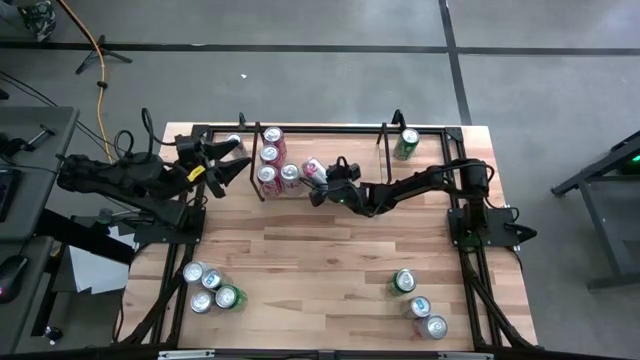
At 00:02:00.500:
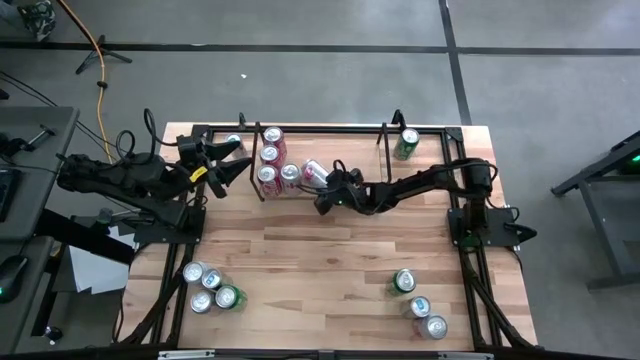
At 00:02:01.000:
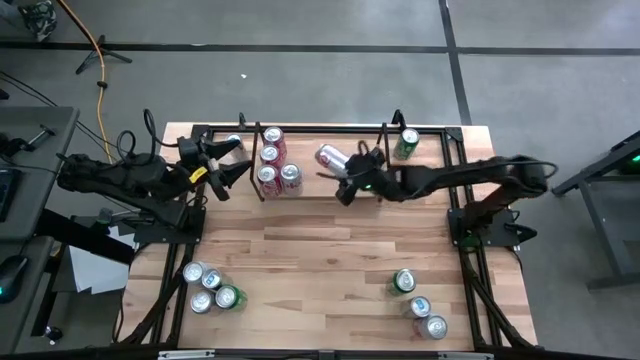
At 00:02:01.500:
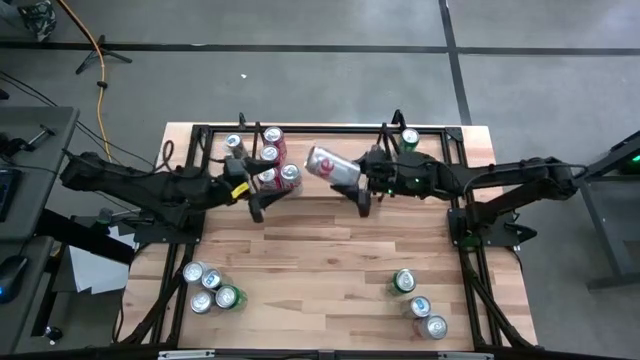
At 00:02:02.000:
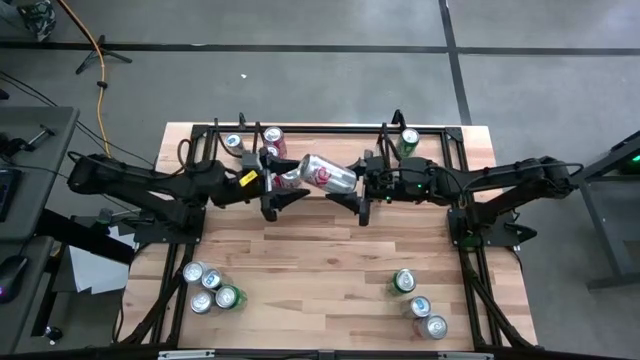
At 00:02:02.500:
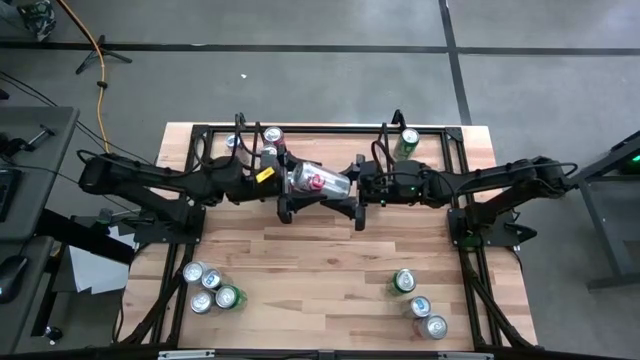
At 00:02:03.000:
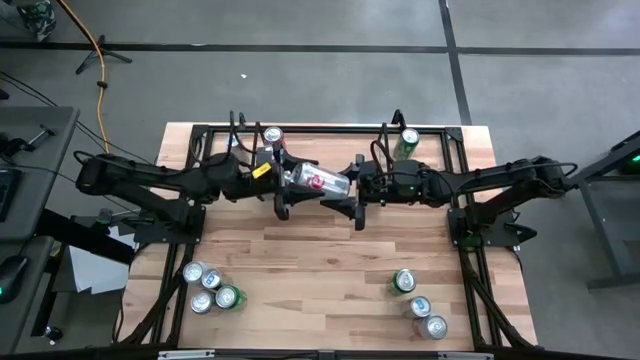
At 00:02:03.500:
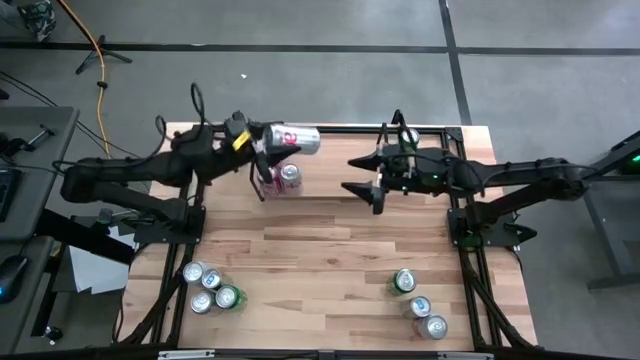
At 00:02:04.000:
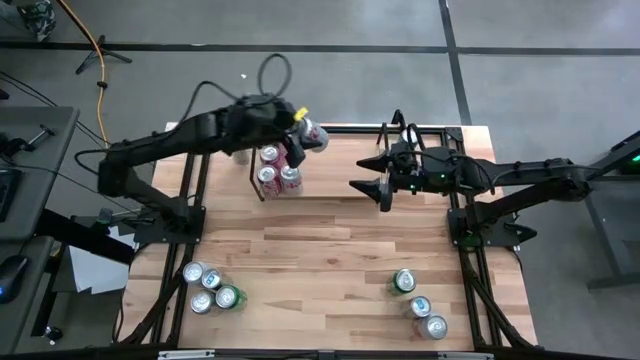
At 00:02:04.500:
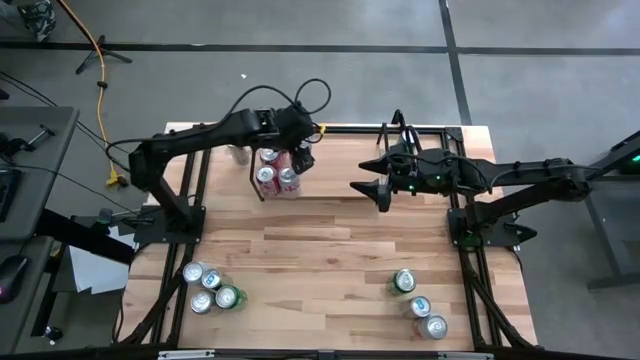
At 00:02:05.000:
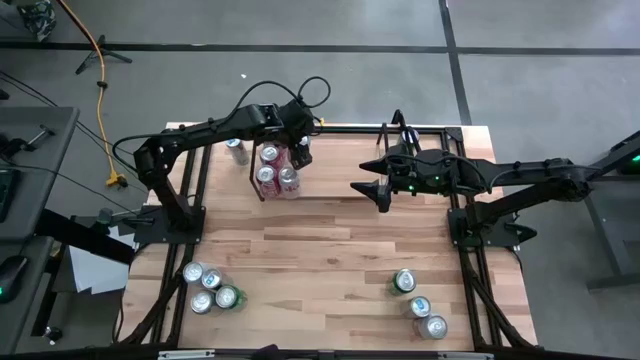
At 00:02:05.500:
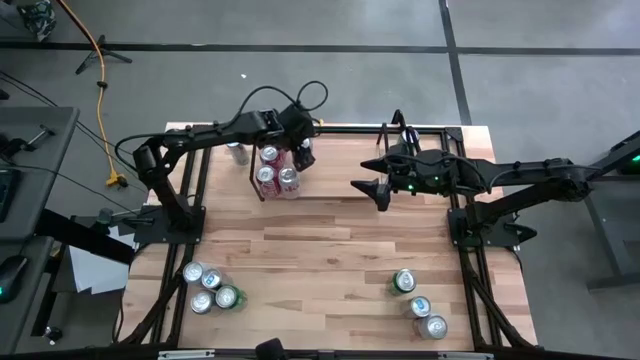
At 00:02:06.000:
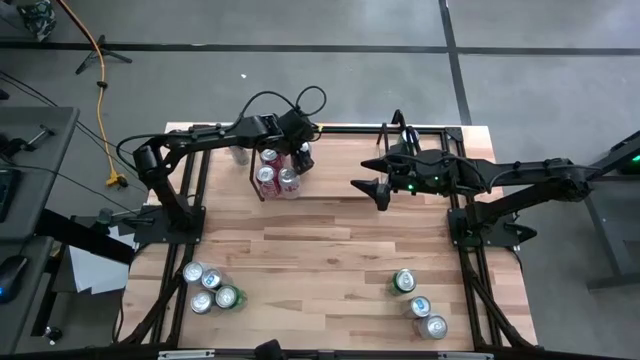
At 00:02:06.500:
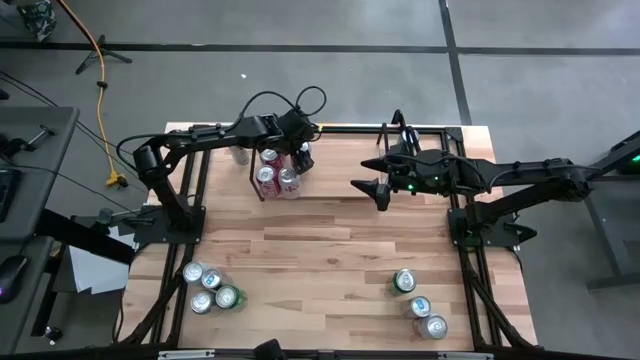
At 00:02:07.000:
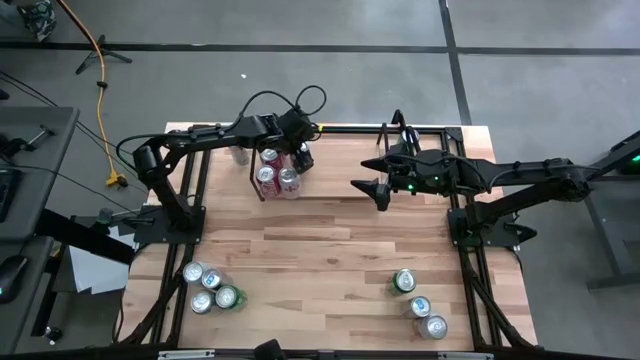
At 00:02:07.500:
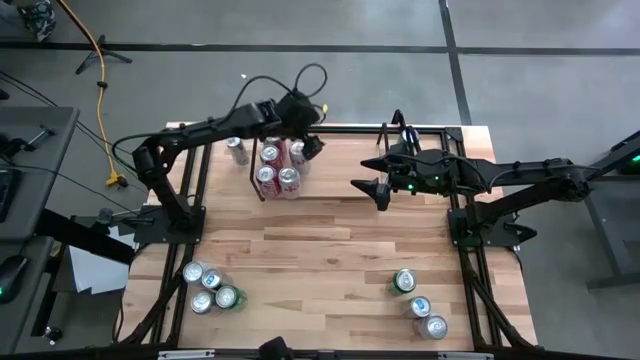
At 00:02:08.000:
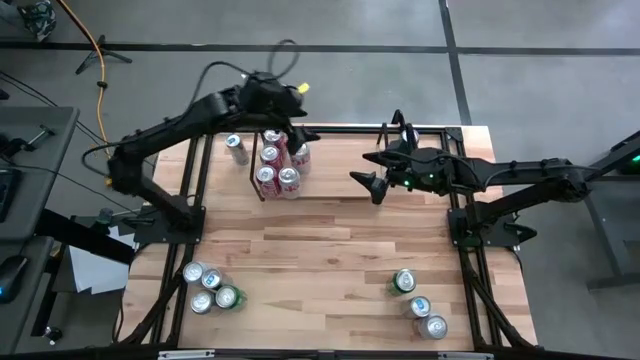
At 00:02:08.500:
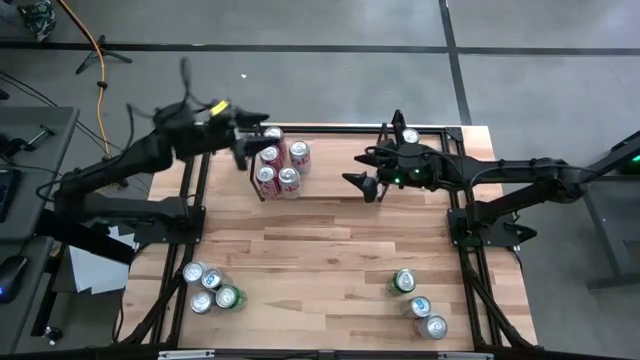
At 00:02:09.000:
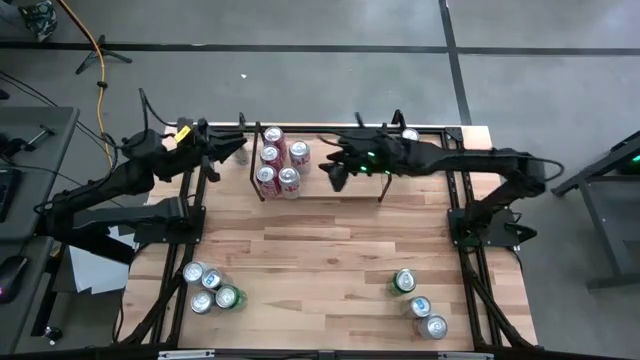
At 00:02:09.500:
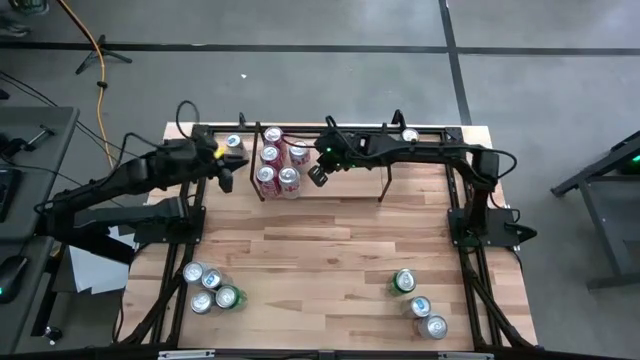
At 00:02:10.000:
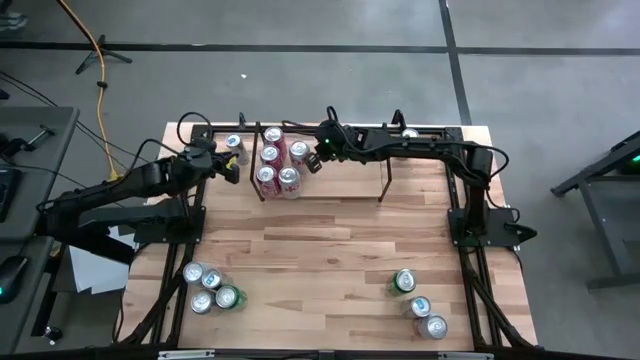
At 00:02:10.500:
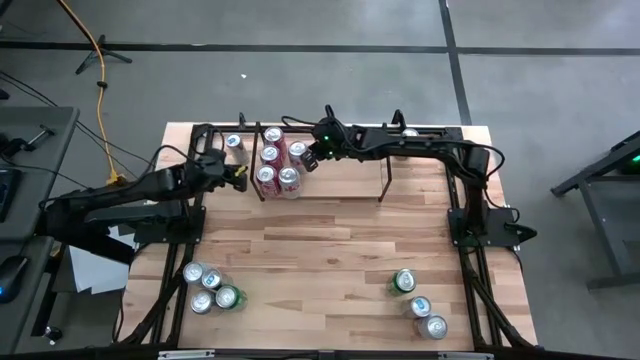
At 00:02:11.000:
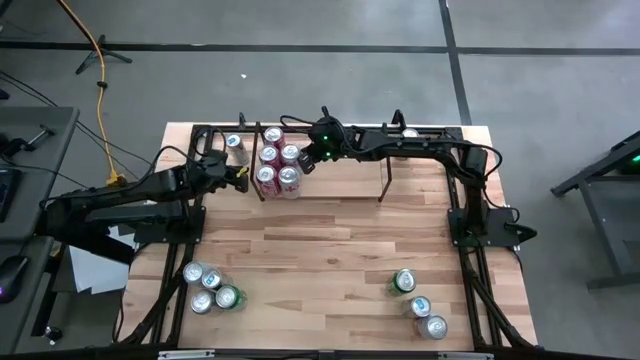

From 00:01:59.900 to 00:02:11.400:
Task: Place canned beverage on shelf
Put the top silver soda can on the shelf aligned with the other silver soda can

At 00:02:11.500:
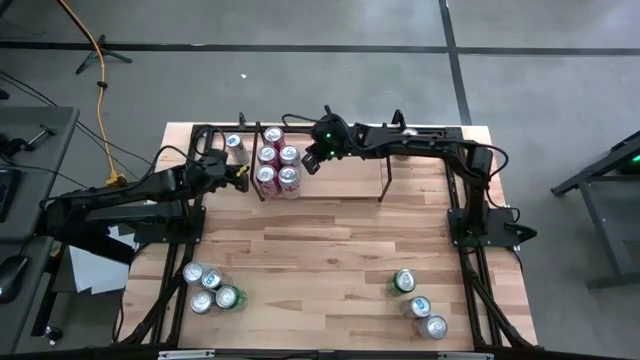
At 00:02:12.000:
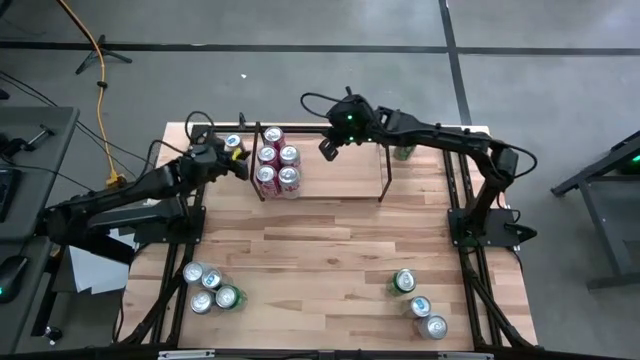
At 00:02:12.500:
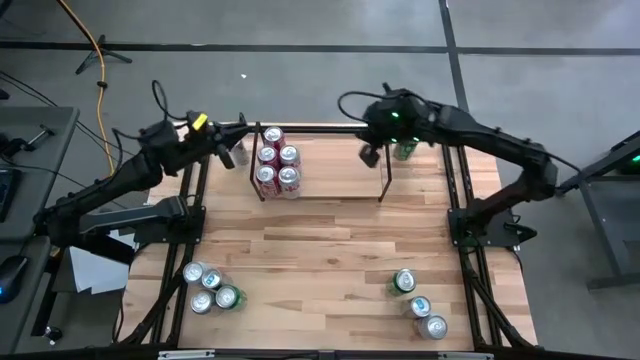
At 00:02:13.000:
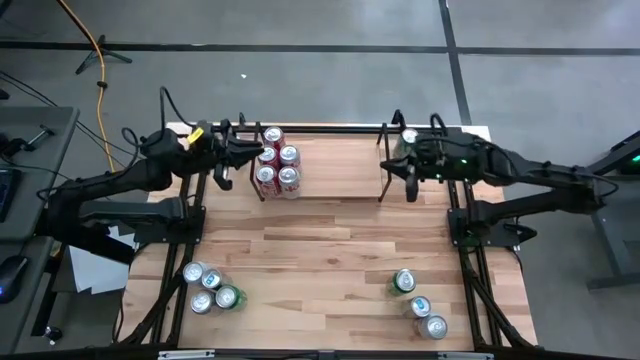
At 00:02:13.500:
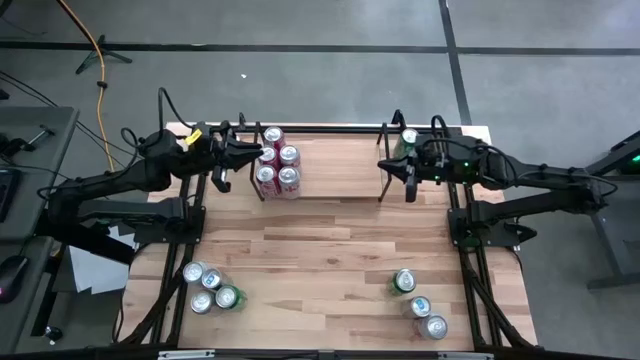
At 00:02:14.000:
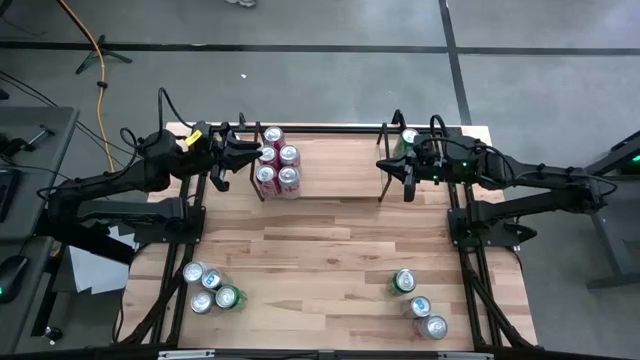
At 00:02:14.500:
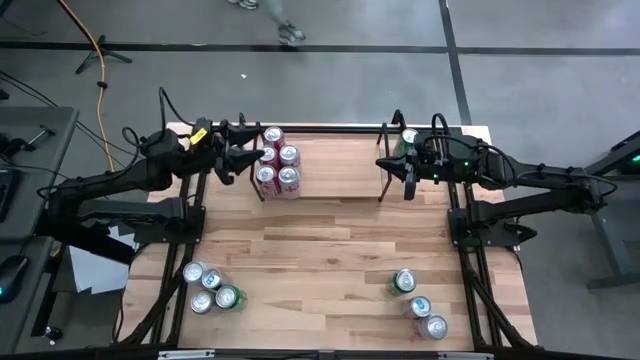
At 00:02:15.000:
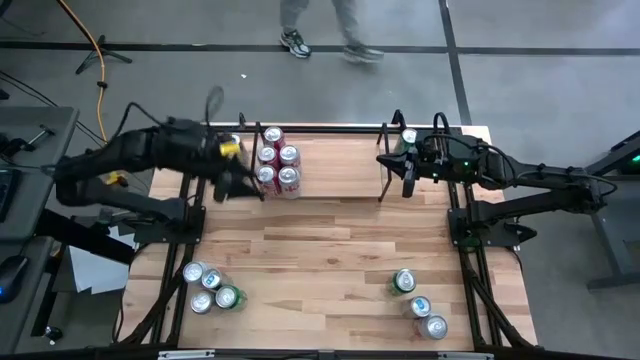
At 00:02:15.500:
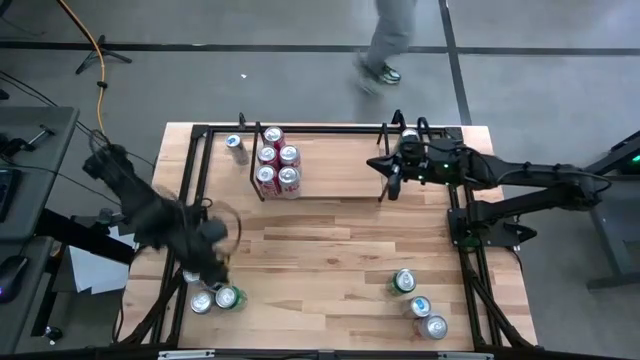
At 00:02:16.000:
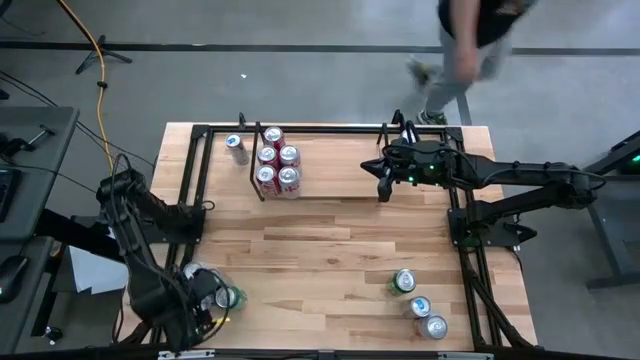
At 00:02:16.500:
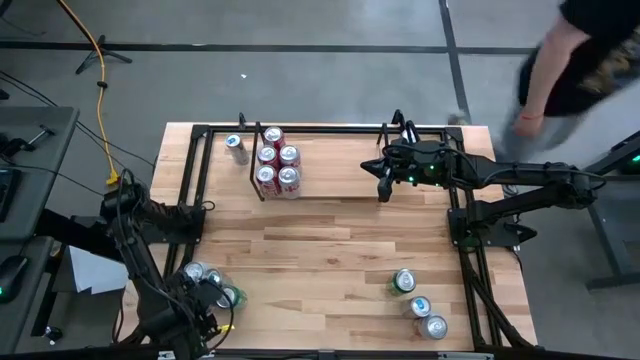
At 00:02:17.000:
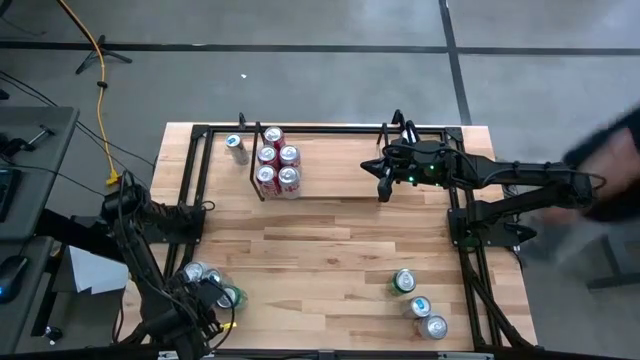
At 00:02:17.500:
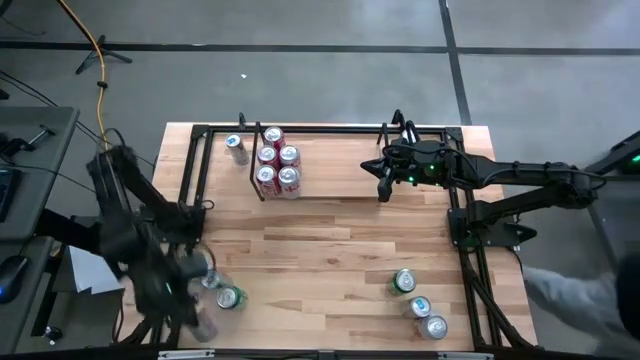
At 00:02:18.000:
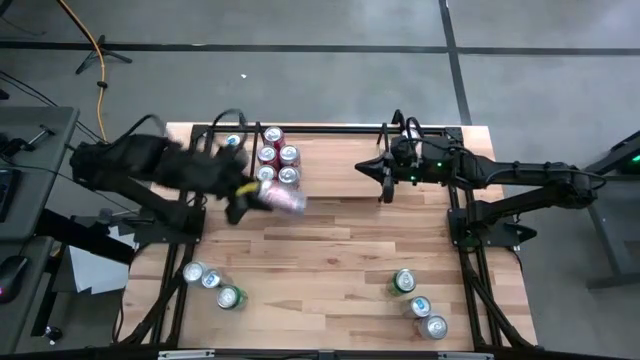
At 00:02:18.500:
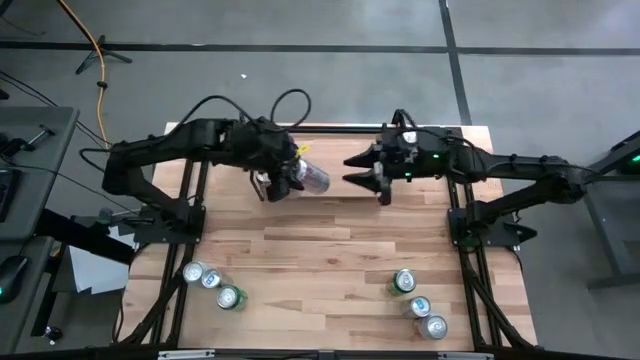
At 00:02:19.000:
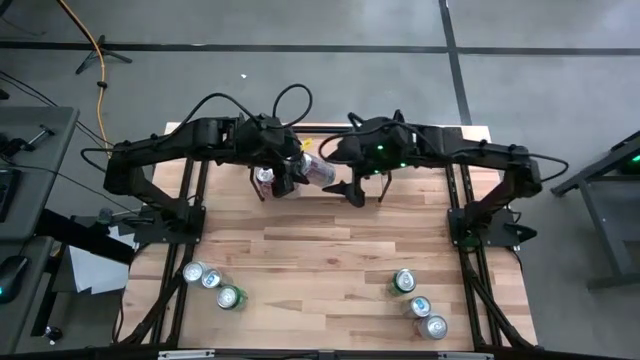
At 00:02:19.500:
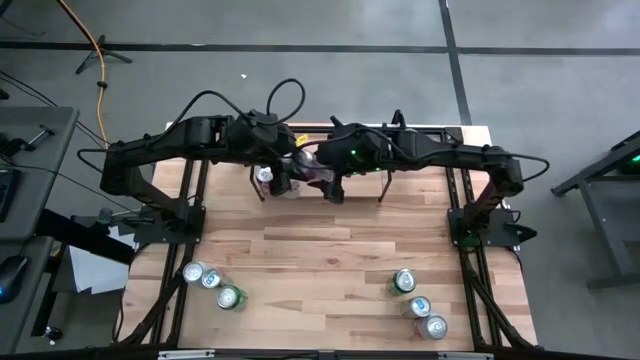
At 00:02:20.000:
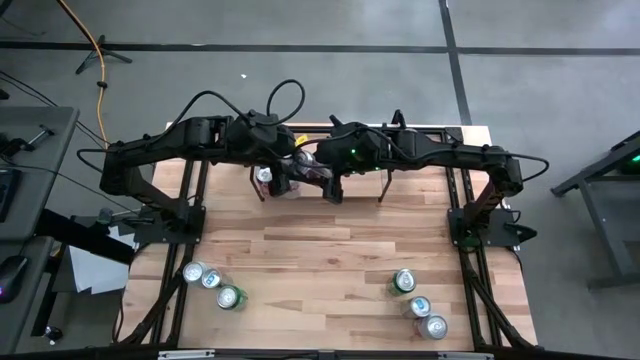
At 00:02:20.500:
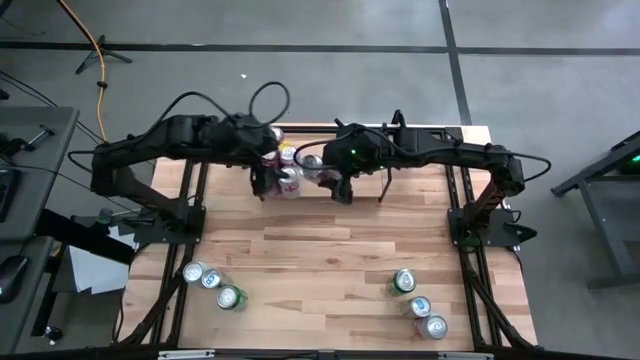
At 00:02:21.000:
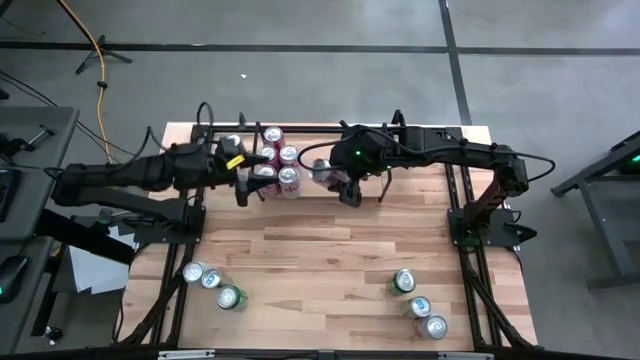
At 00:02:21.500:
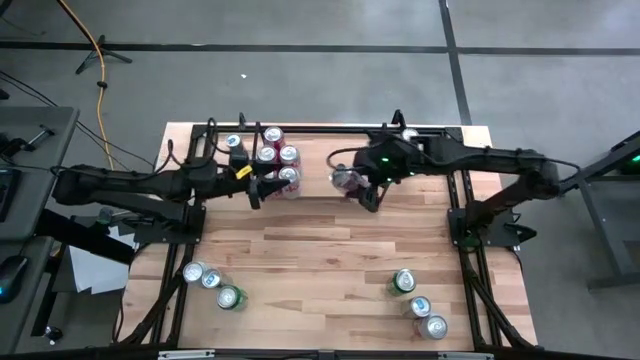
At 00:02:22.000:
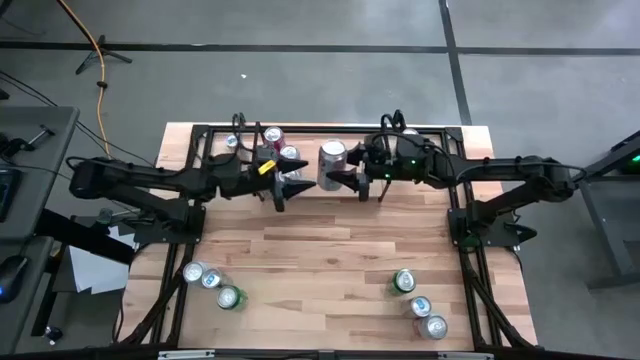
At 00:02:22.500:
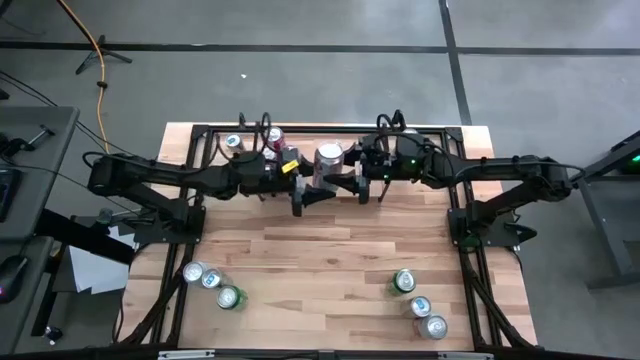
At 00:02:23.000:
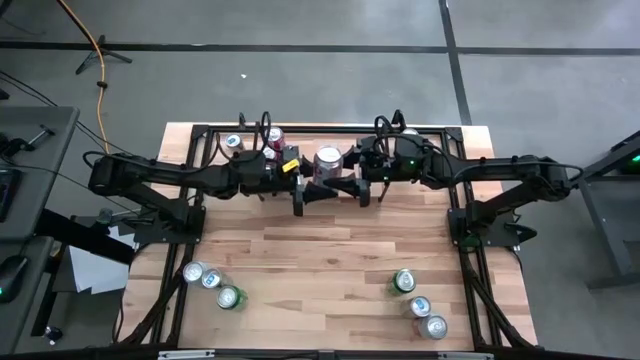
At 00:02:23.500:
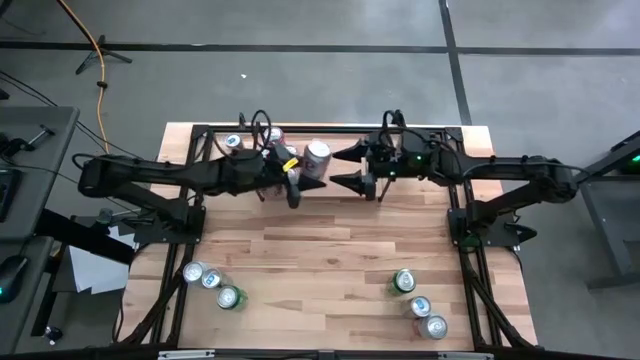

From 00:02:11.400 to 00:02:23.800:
Put the silver soda can on the shelf aligned with the other silver soda cans
